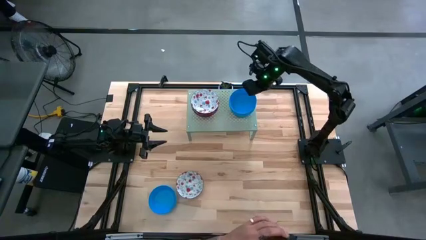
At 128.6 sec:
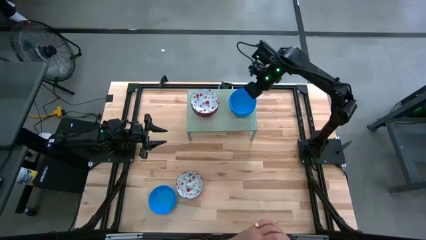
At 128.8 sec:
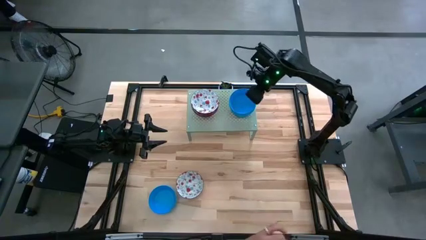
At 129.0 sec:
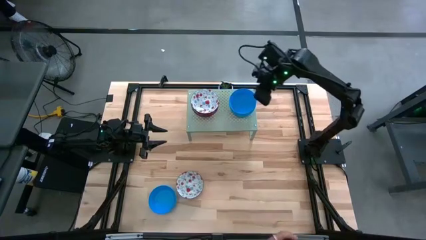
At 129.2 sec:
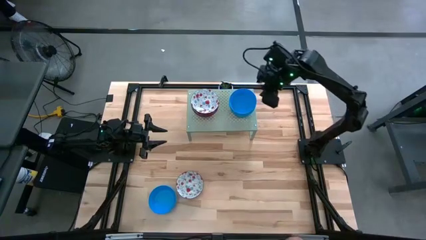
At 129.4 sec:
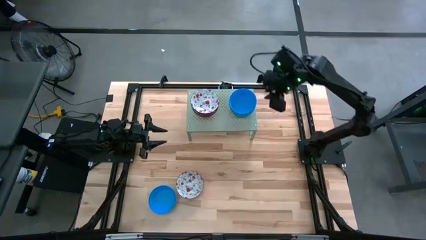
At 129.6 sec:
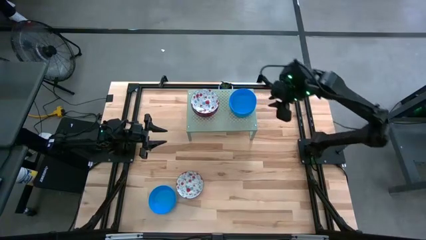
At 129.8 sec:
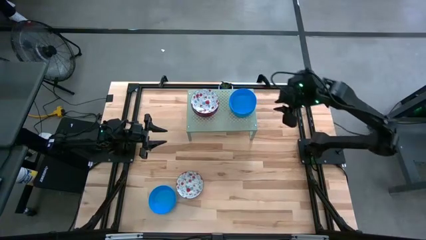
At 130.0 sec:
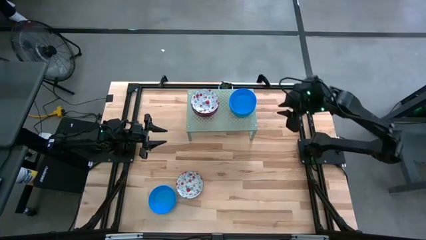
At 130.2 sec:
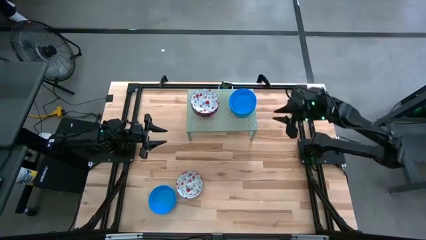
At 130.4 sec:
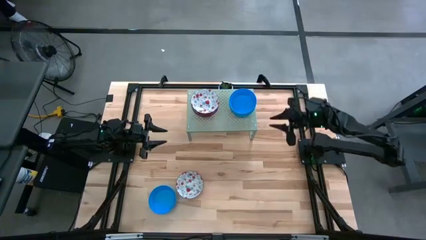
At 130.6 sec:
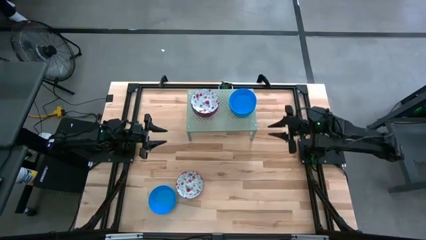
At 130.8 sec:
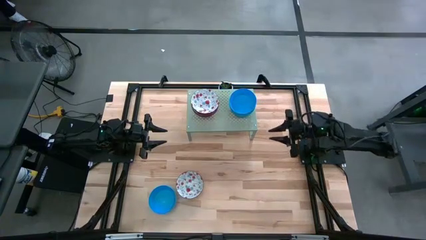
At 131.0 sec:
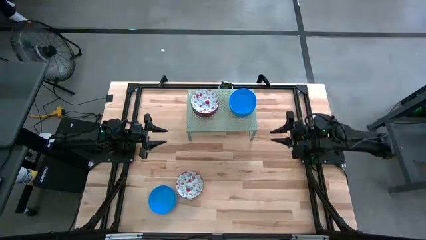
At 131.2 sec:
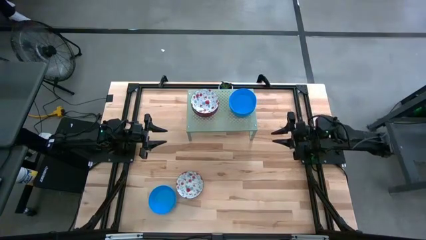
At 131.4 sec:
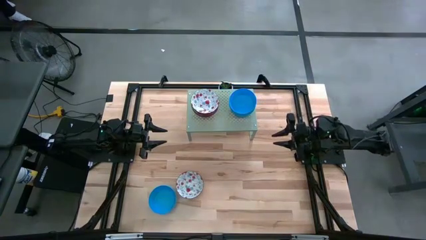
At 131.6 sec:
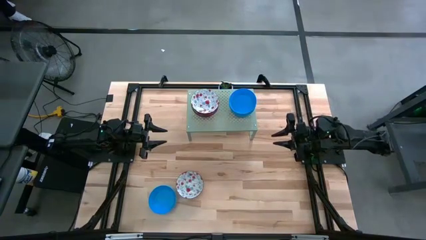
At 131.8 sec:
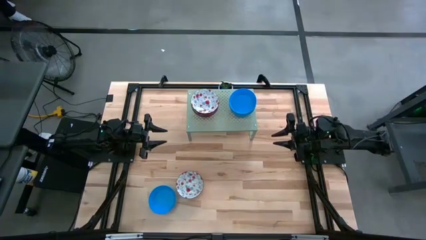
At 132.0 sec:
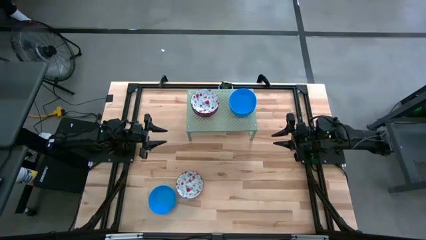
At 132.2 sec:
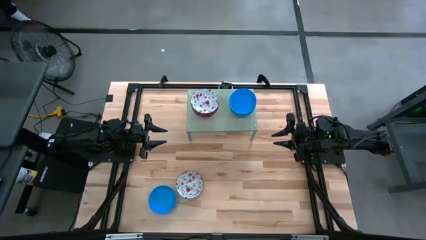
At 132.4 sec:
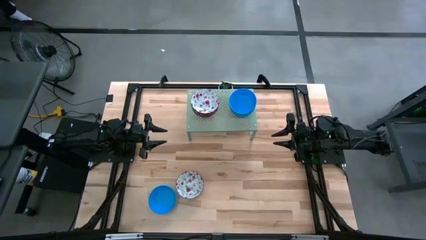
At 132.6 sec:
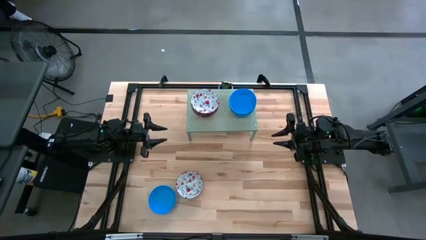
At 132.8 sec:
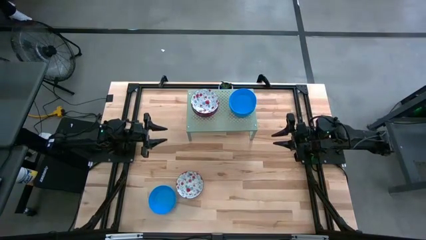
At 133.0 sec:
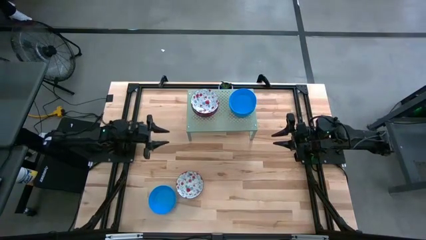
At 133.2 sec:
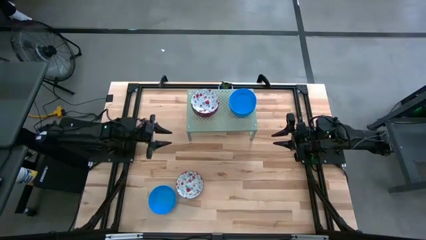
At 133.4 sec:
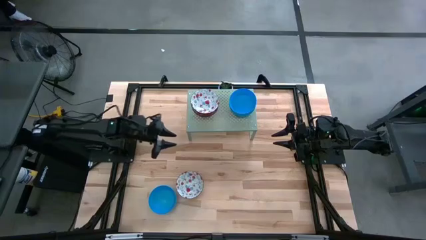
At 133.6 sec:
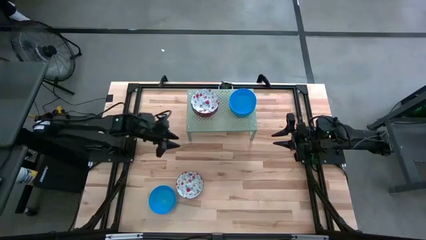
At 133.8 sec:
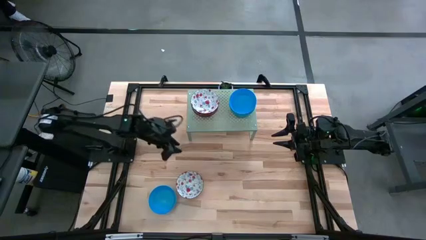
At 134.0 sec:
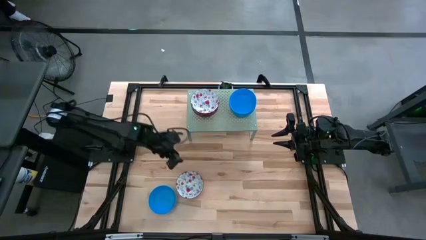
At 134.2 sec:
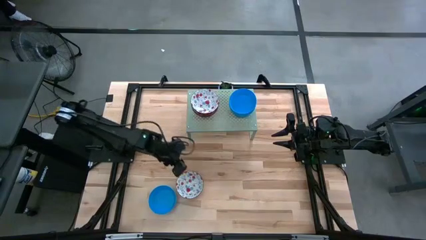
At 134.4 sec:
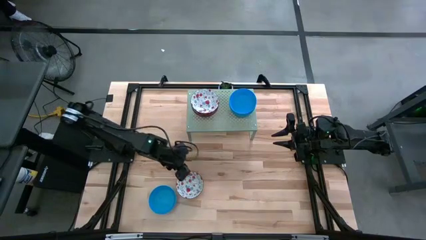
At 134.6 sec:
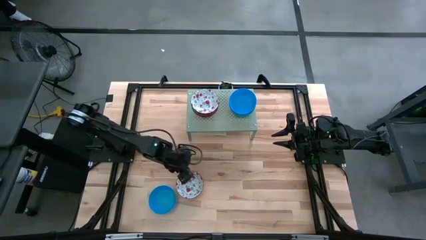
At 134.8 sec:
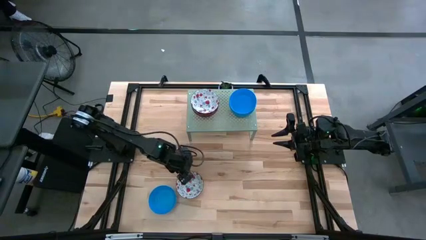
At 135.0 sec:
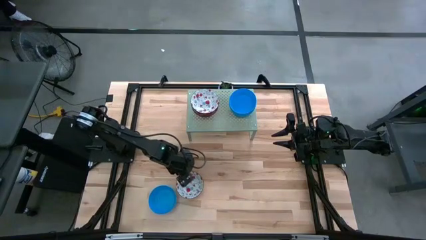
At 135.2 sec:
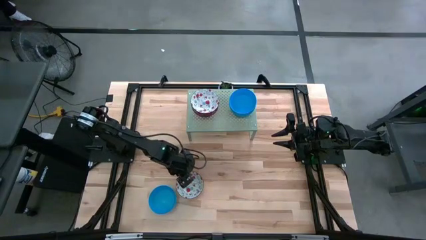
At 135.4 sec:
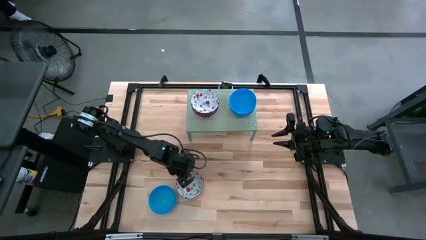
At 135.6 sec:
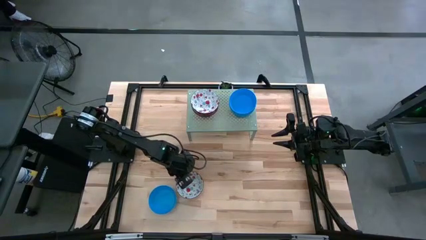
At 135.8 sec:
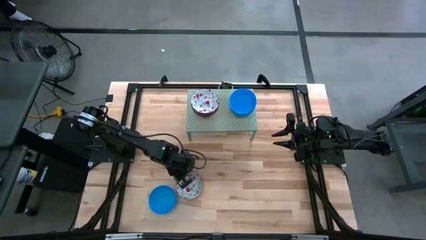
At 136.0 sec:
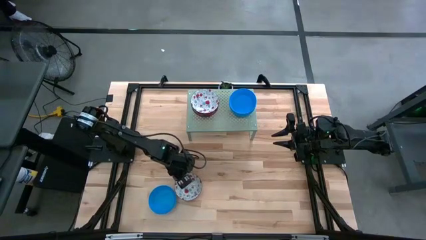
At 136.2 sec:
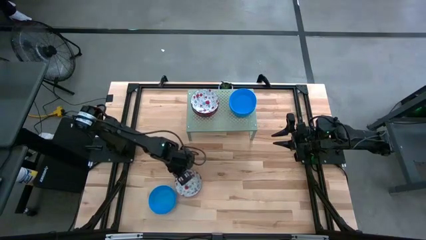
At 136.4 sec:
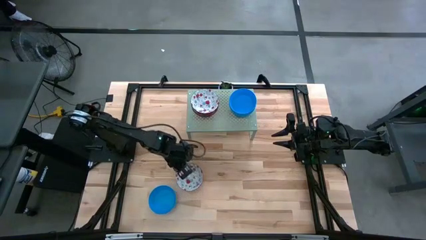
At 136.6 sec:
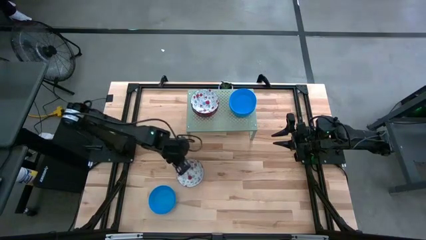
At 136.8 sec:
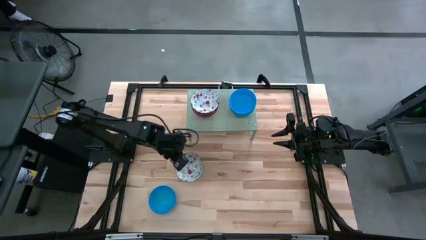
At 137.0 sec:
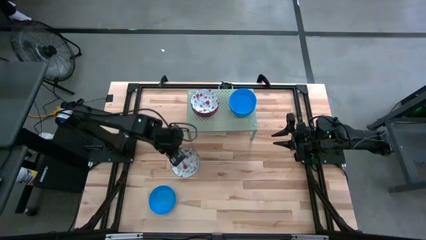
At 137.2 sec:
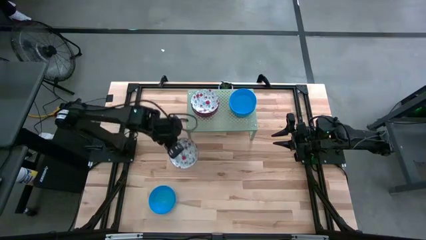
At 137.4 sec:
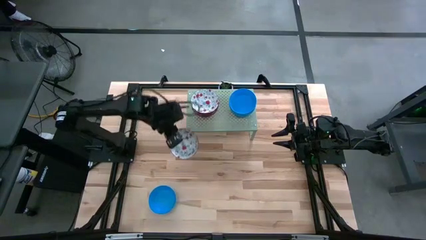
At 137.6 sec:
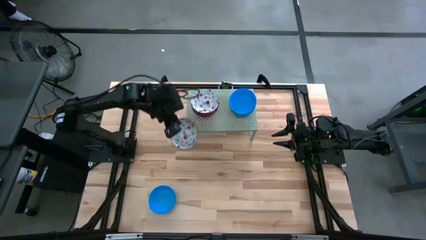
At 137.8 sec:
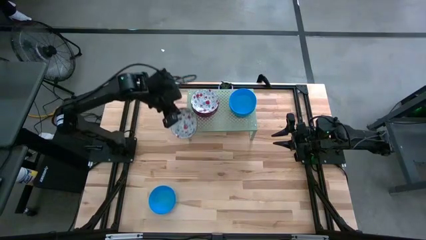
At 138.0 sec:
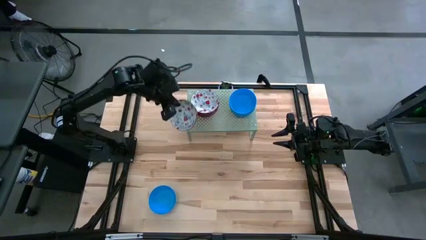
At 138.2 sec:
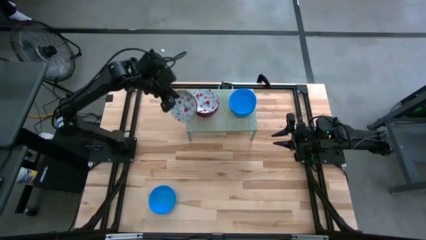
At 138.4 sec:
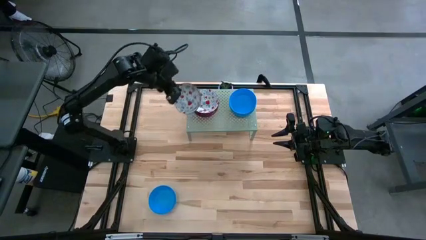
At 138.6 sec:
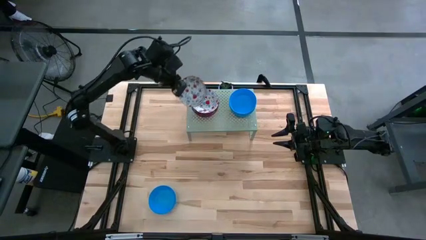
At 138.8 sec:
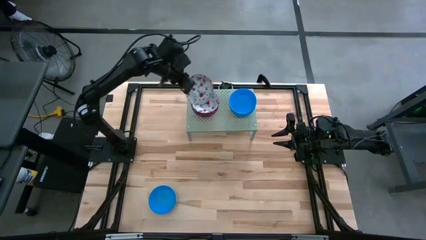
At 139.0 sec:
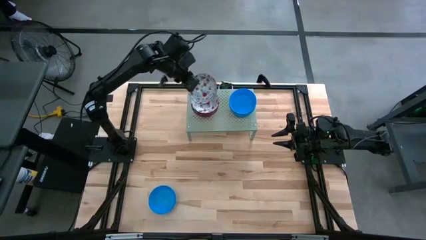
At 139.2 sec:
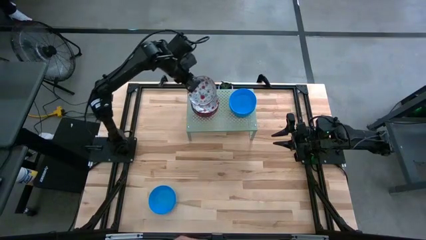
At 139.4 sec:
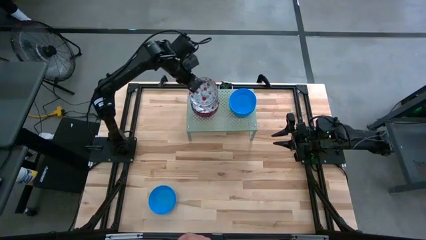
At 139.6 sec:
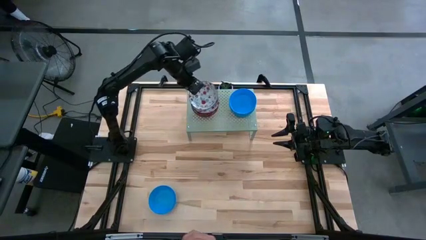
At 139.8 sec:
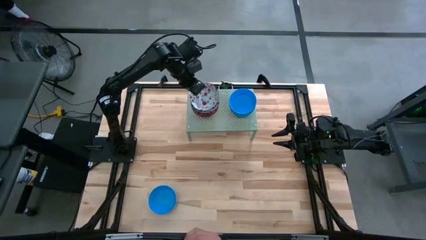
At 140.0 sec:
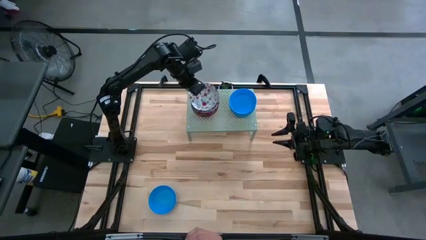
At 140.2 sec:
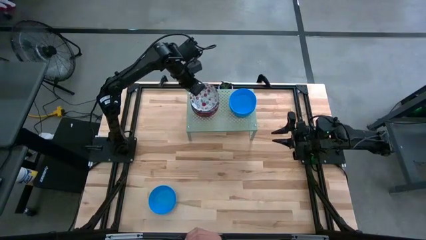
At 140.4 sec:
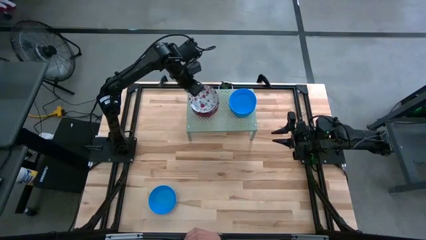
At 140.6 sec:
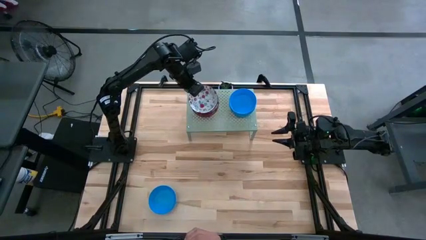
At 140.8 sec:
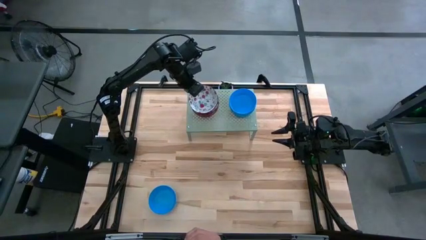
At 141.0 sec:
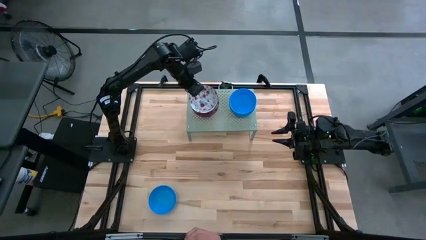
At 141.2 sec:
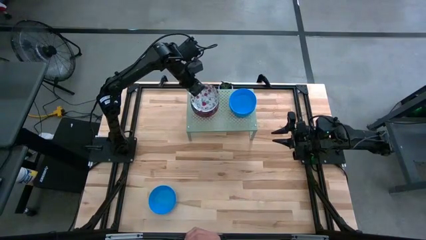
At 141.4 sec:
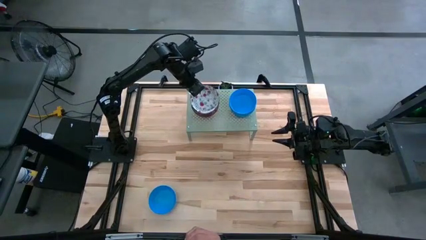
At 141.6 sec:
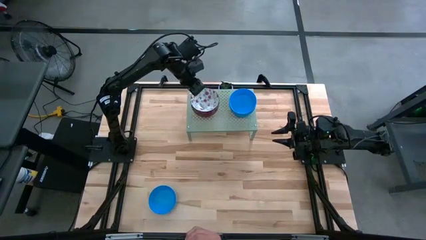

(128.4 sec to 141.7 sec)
Task: Pick & Place Mini bowls
Stack the patterned red bowl on the patterned red bowl on the shelf
